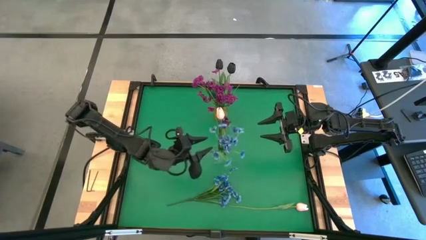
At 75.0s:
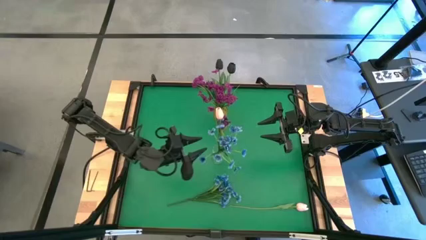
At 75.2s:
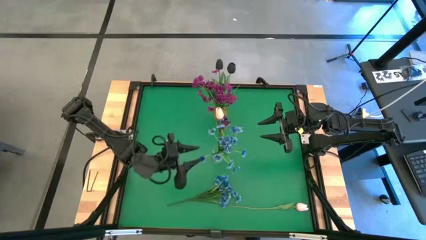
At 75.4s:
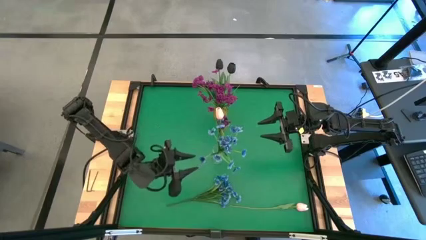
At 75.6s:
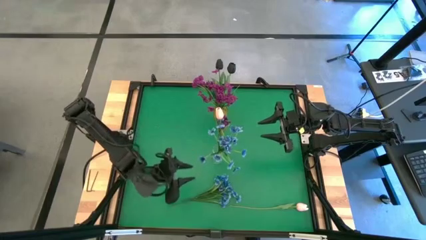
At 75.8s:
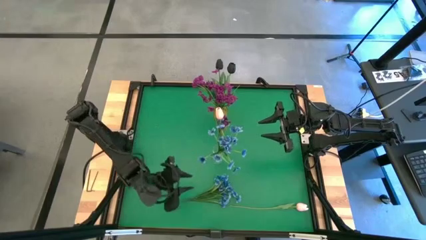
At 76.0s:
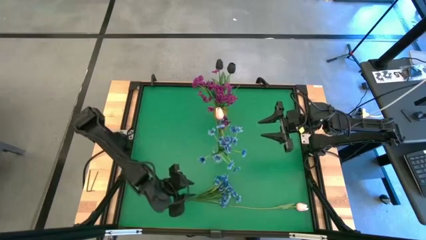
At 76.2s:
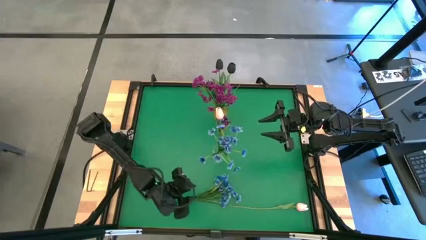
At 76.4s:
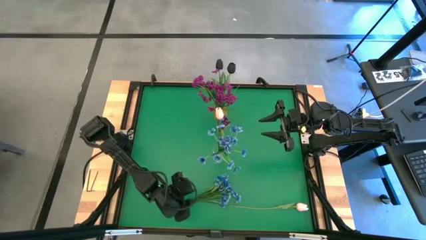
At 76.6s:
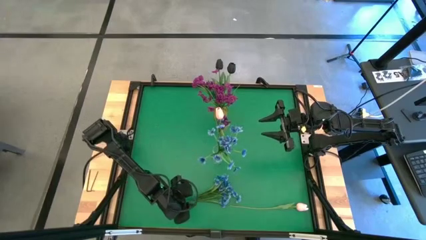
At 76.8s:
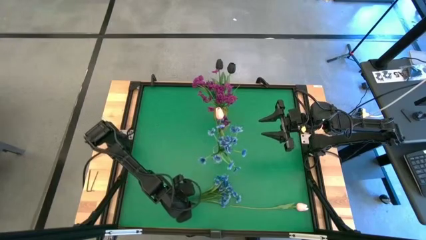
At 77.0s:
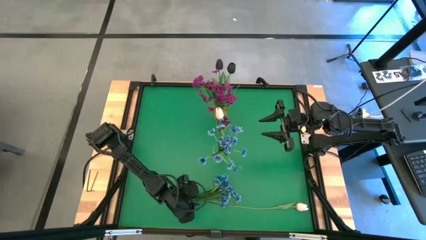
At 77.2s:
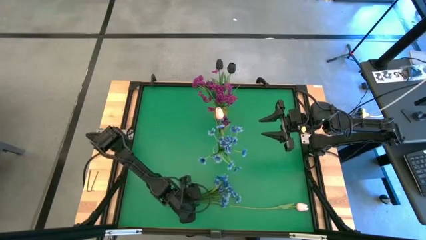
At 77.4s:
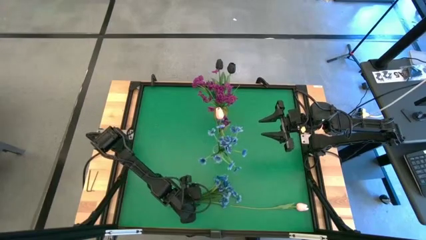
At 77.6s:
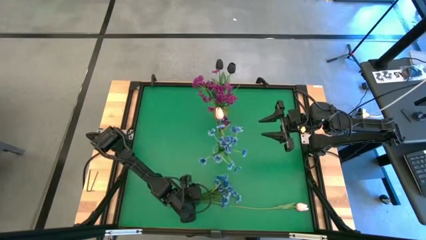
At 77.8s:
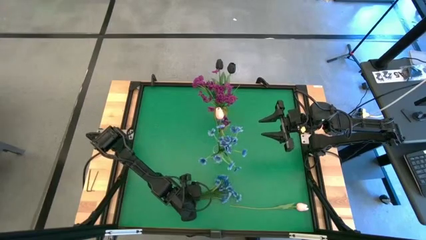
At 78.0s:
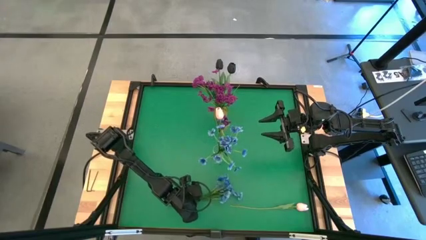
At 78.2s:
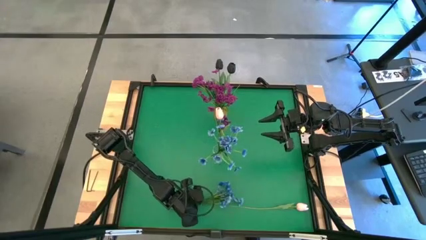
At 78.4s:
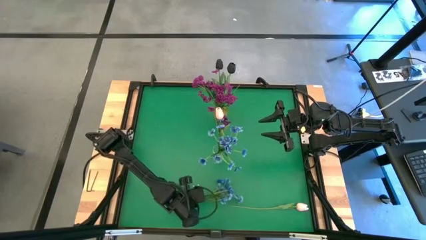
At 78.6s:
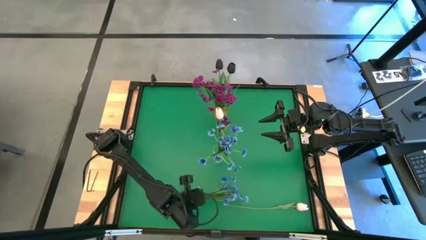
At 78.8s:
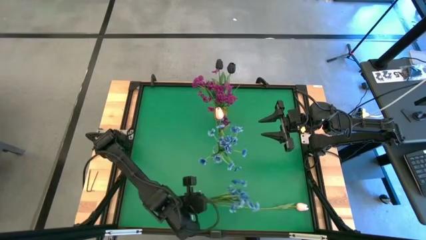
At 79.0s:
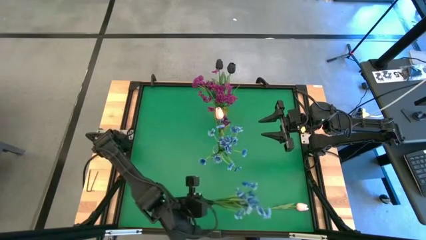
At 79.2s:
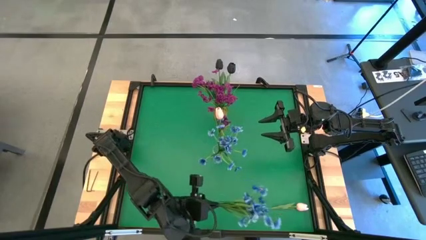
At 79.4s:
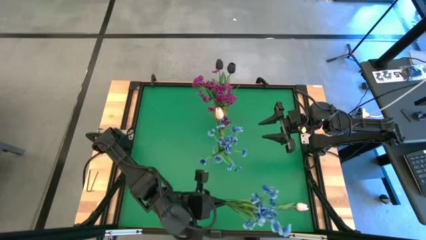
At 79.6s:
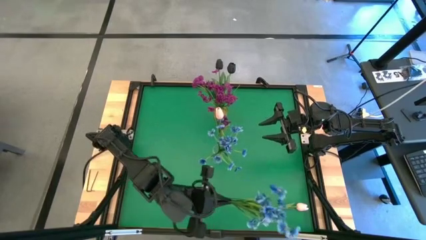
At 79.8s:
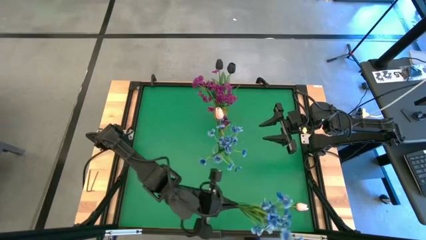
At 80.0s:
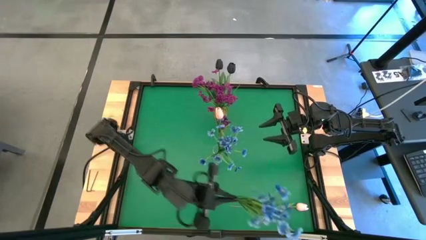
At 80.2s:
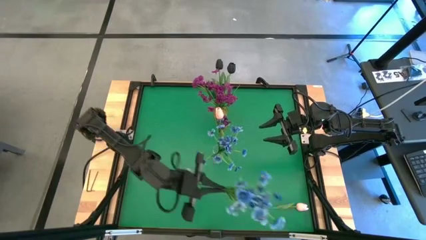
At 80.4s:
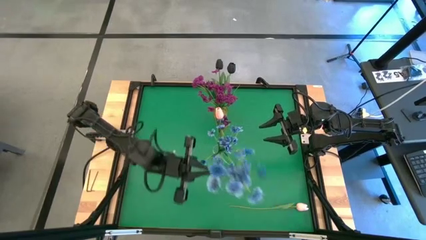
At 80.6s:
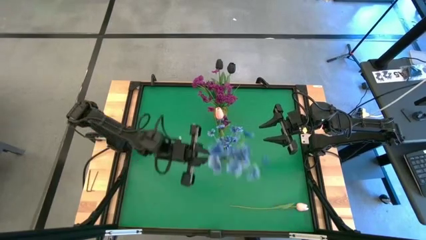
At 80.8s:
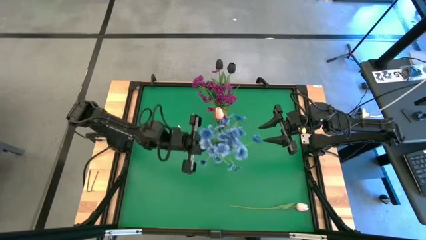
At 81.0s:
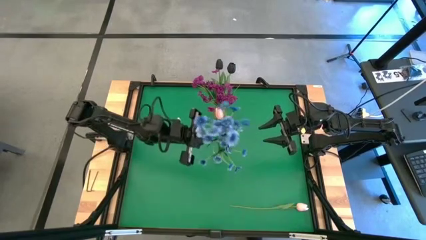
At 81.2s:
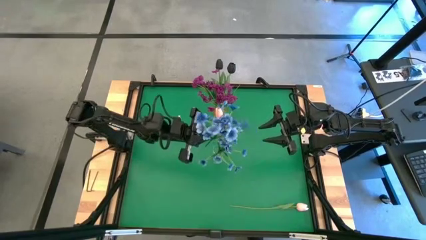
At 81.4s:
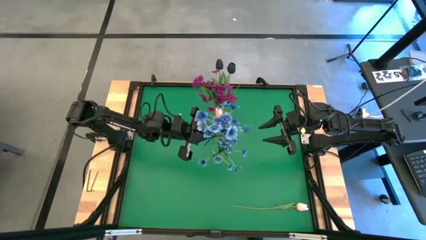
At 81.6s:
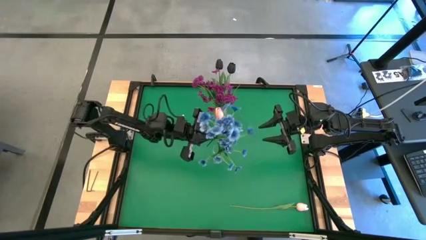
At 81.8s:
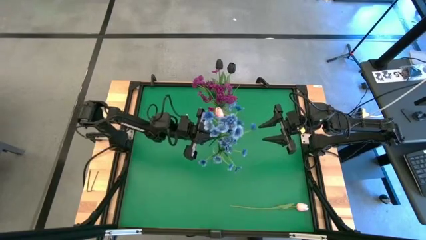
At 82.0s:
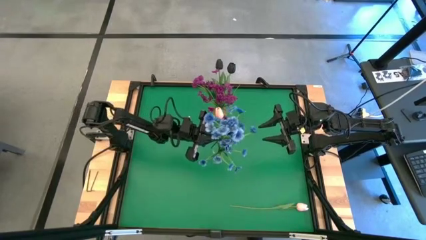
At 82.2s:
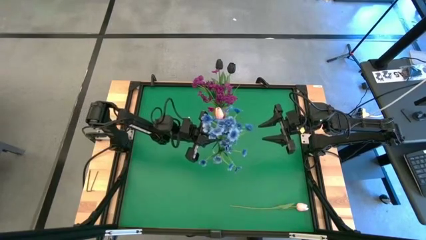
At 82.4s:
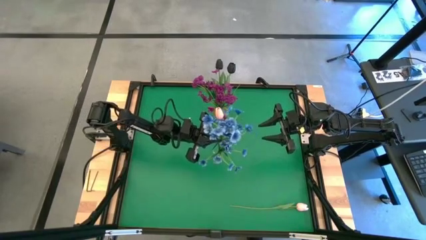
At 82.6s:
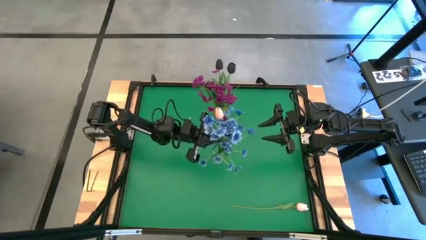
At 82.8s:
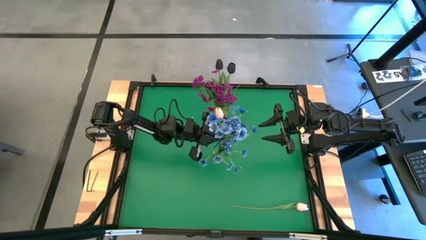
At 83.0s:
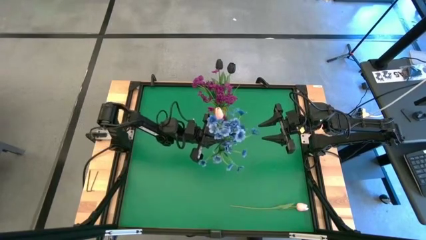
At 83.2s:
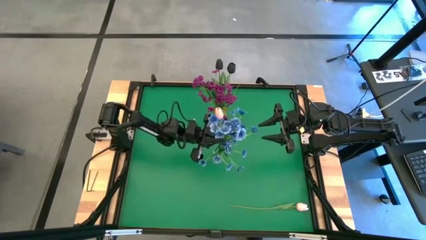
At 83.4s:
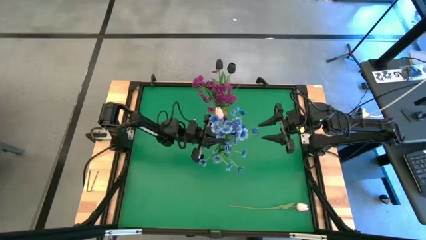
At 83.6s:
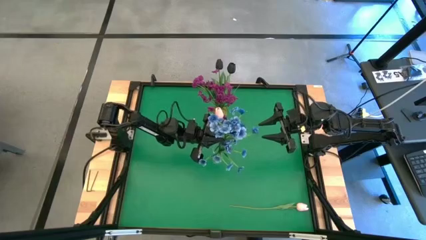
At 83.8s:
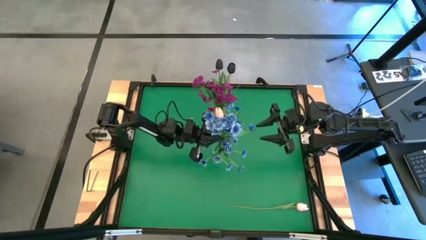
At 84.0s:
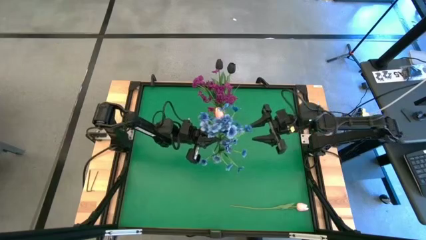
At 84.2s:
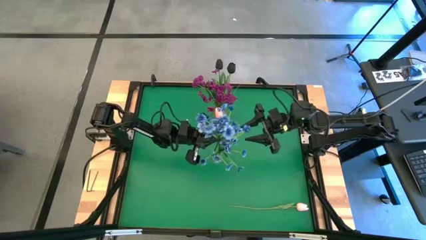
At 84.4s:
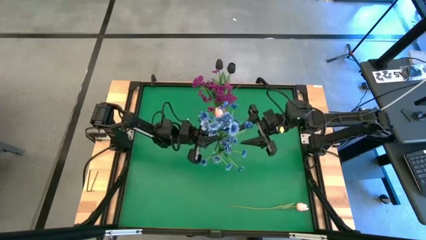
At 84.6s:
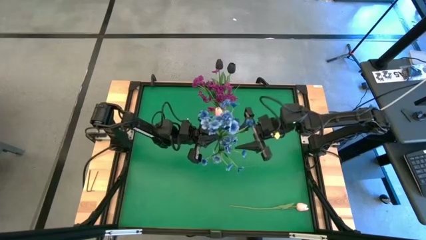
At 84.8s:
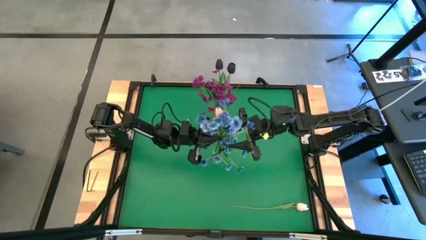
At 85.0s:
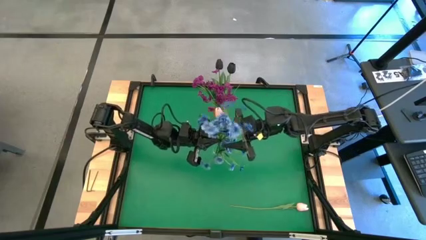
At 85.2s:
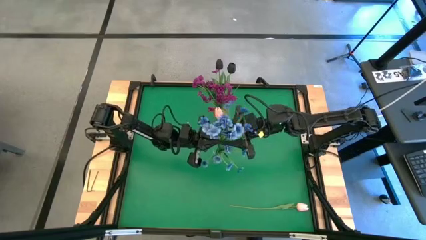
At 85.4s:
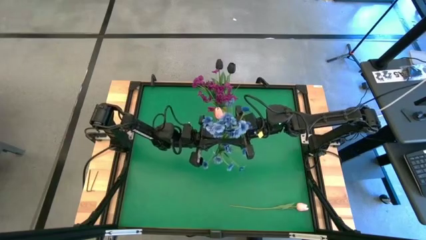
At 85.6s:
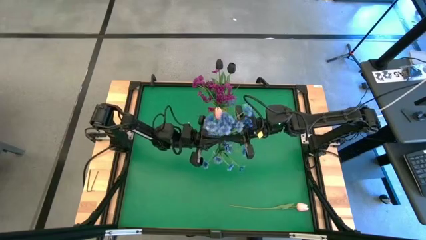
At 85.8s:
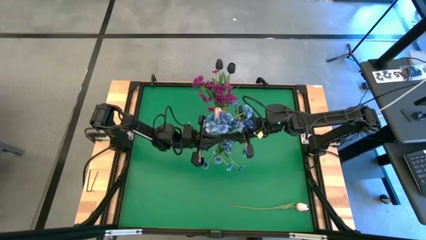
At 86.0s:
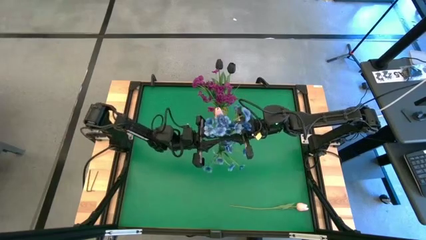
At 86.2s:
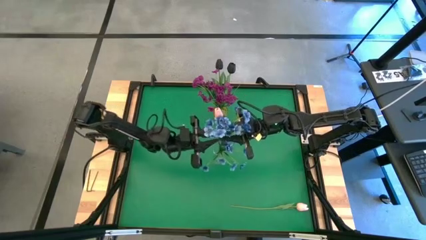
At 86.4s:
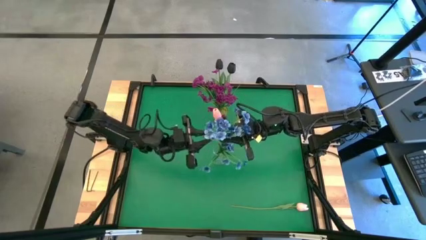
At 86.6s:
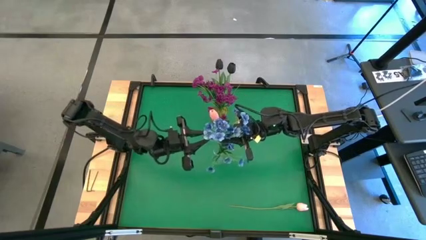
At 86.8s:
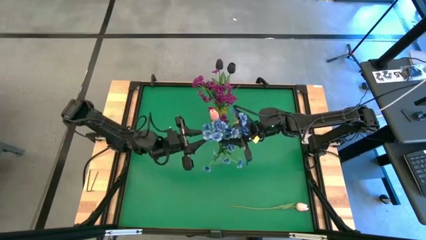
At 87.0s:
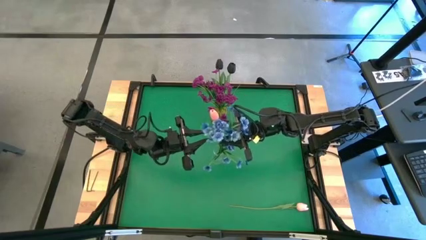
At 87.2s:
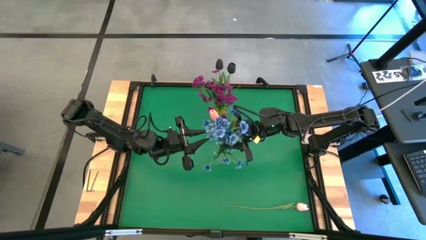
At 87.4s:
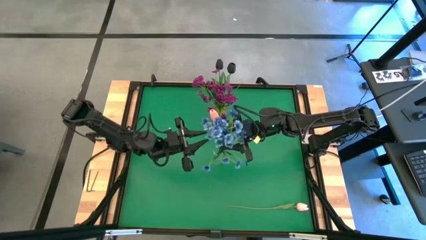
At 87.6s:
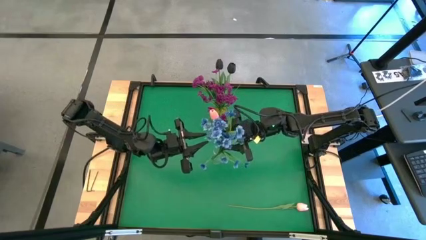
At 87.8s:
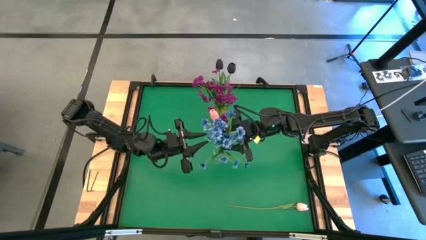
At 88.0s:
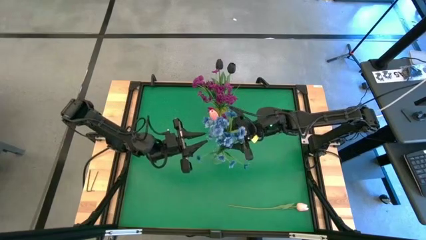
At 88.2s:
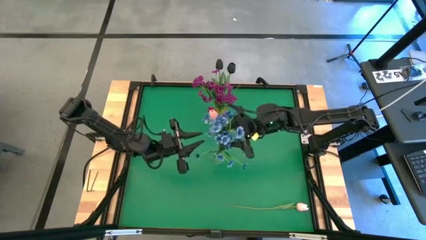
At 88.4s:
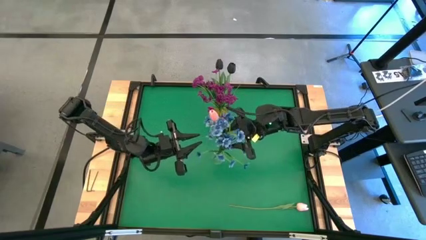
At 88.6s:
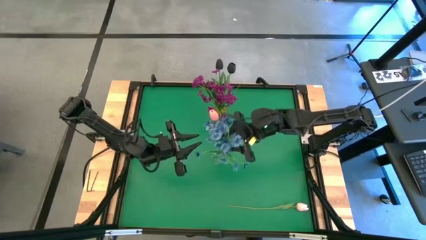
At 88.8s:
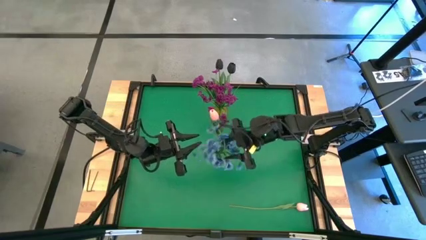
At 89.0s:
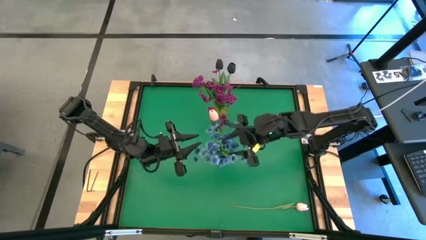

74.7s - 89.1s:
Task: Sort flowers into vase by color
Put the blue flowers into the transparent vase

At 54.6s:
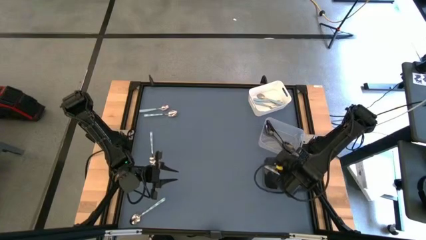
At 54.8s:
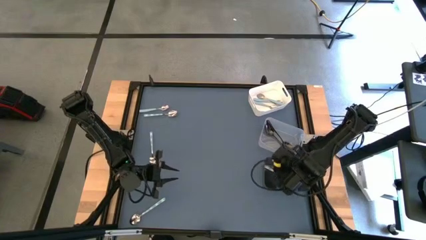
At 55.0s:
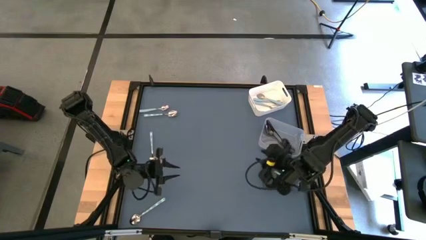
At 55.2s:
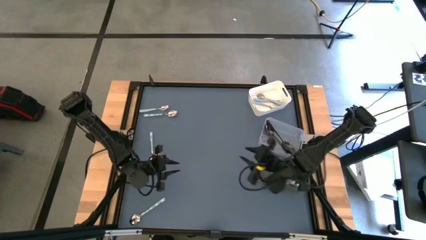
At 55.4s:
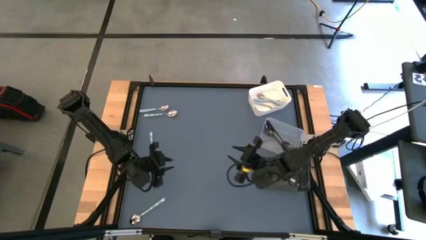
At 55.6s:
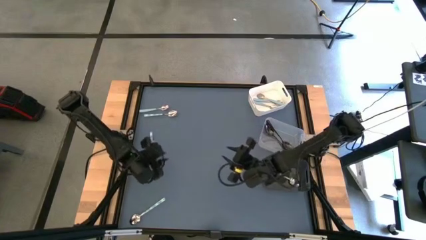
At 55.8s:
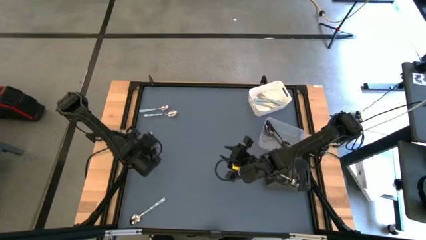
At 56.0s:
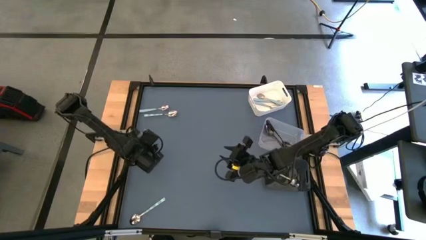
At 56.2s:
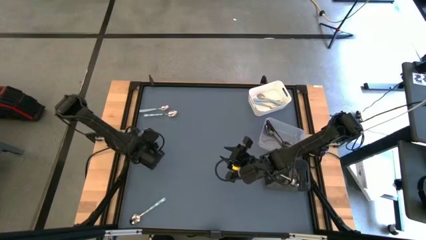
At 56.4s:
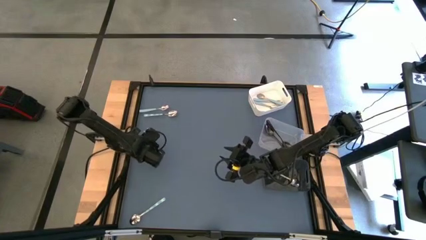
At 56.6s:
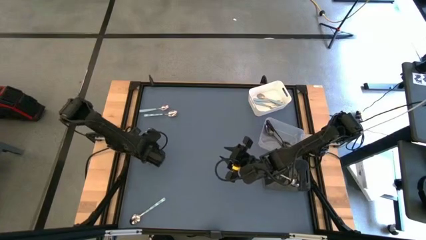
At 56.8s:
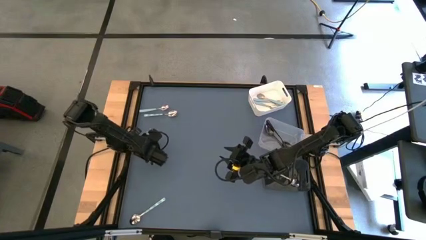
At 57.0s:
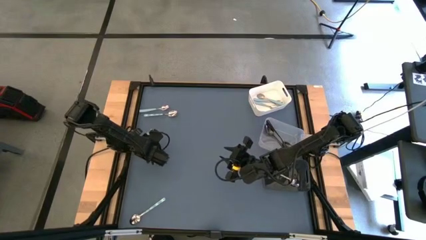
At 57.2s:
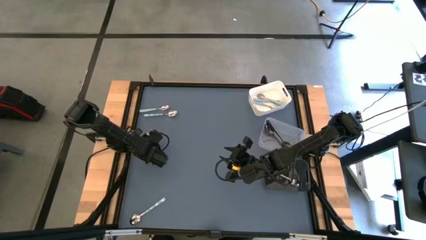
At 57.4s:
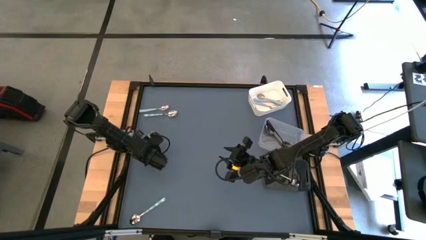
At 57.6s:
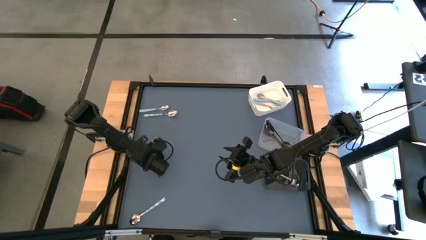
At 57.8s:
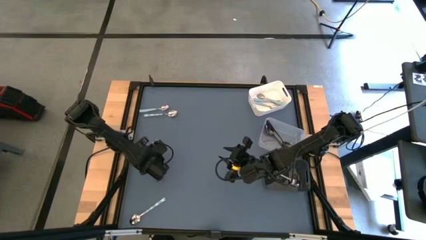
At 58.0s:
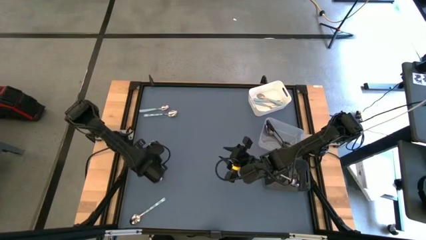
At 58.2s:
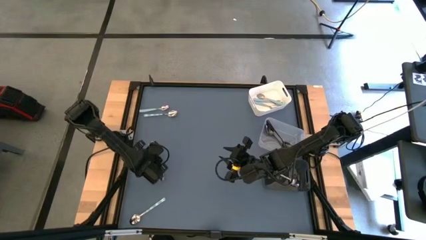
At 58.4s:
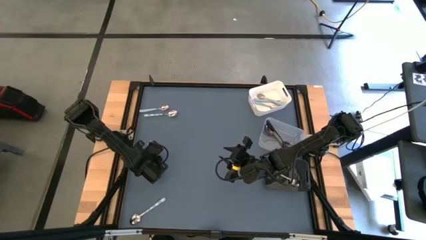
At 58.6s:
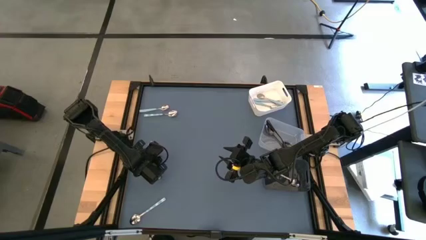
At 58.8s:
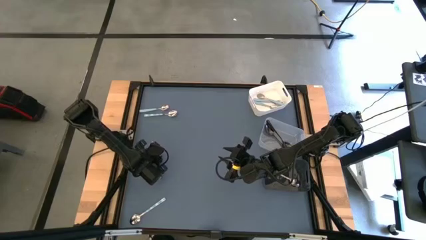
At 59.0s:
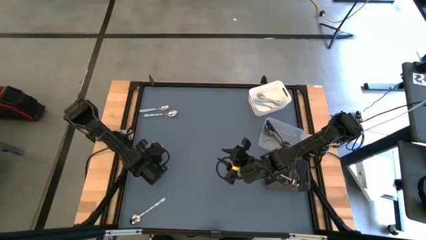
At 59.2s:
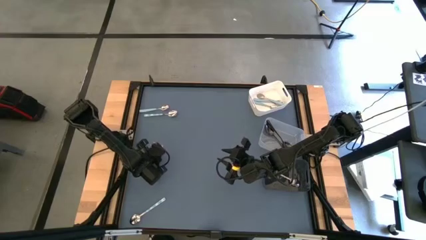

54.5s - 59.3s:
Task: Sort silverware by color (type)
Put the middle left white and blue spoon into the black bin
